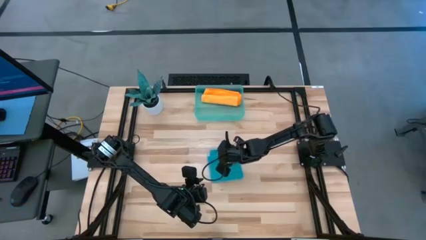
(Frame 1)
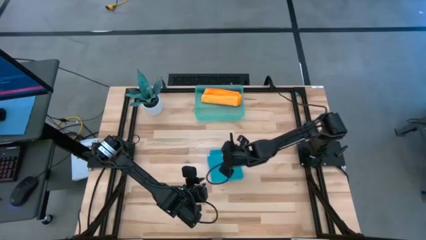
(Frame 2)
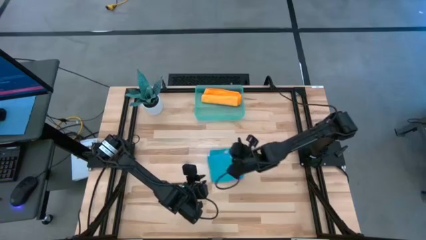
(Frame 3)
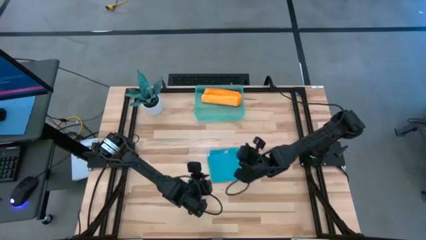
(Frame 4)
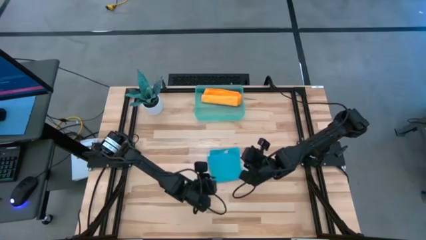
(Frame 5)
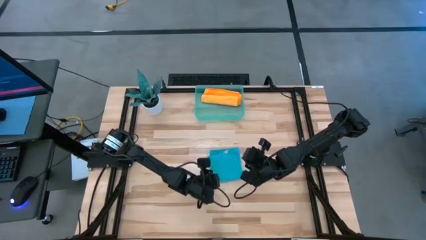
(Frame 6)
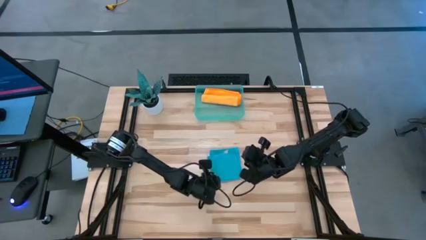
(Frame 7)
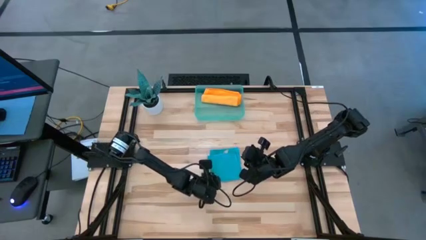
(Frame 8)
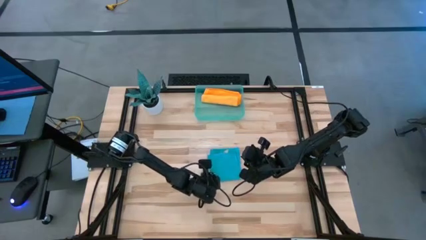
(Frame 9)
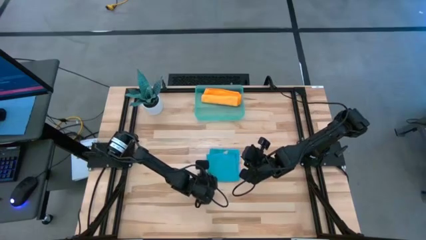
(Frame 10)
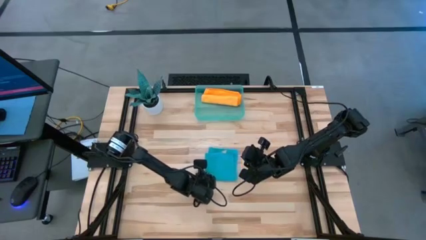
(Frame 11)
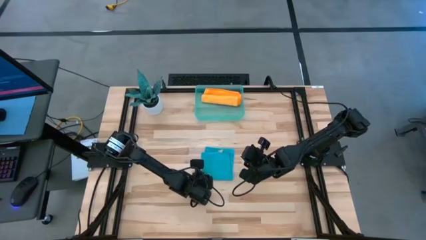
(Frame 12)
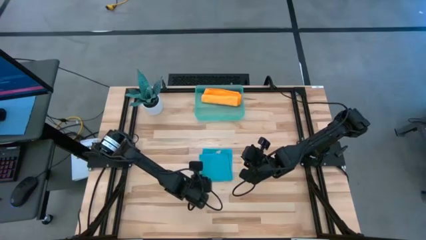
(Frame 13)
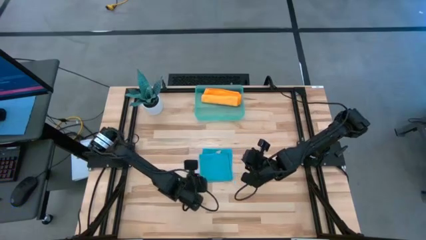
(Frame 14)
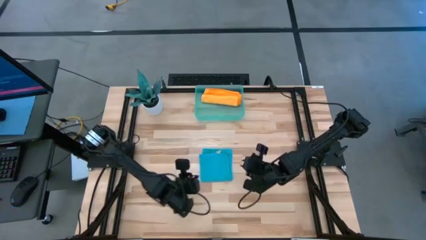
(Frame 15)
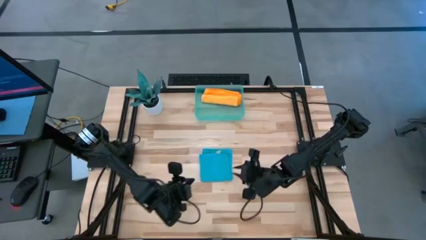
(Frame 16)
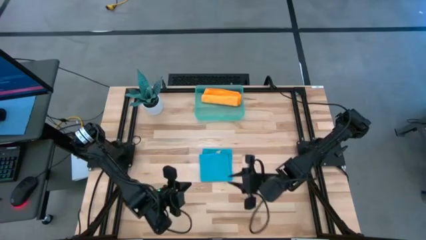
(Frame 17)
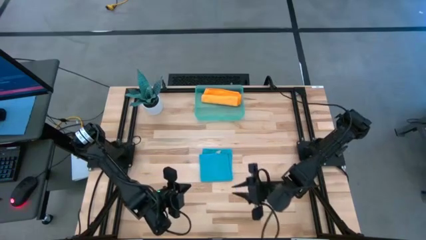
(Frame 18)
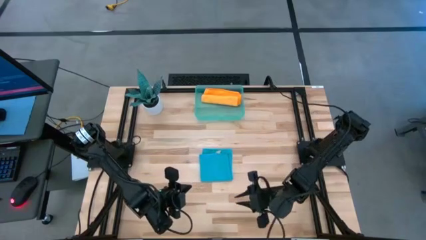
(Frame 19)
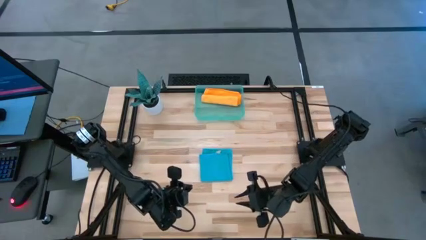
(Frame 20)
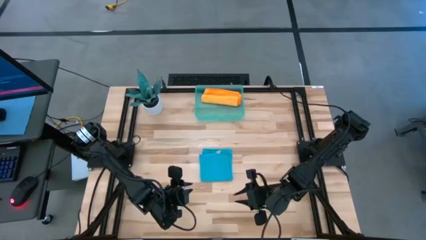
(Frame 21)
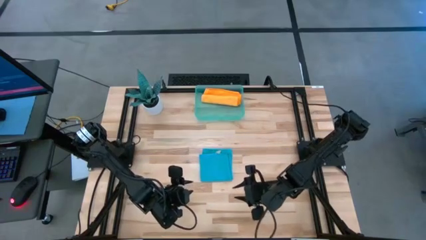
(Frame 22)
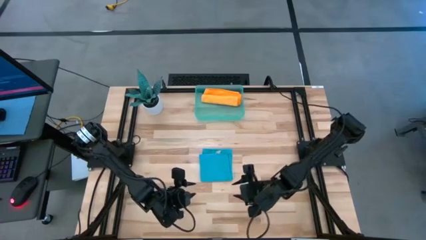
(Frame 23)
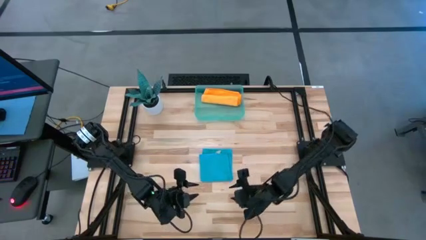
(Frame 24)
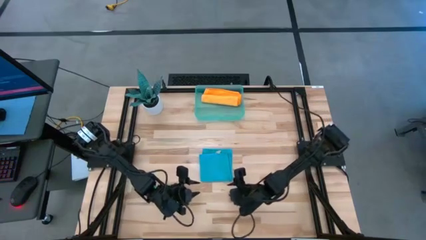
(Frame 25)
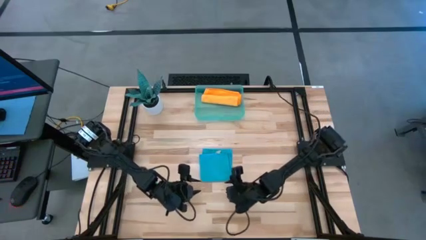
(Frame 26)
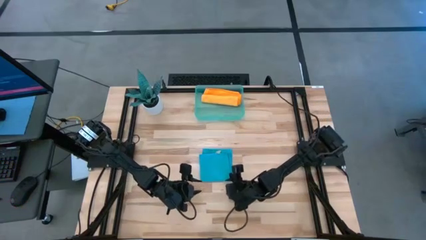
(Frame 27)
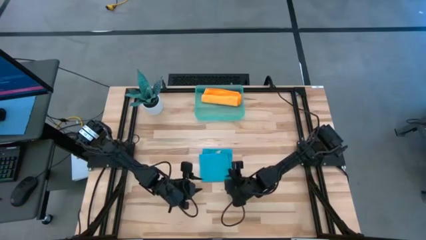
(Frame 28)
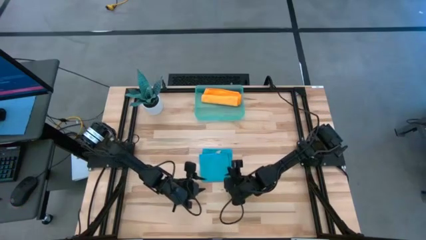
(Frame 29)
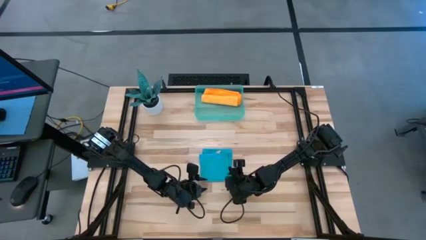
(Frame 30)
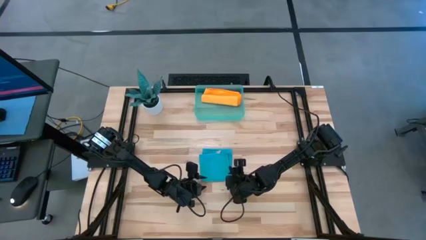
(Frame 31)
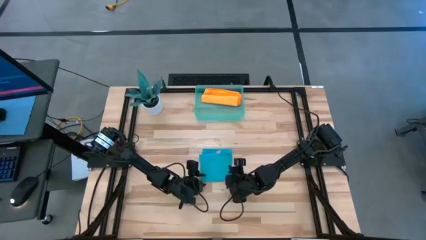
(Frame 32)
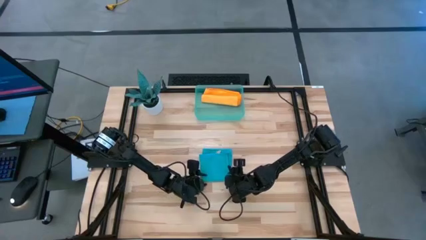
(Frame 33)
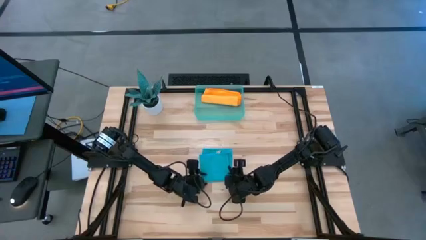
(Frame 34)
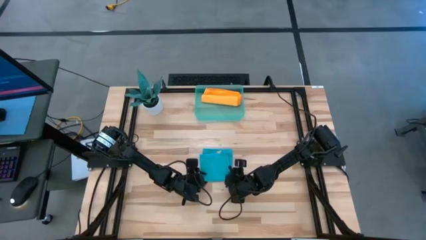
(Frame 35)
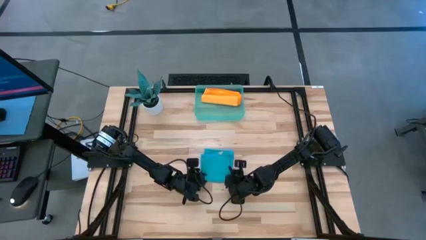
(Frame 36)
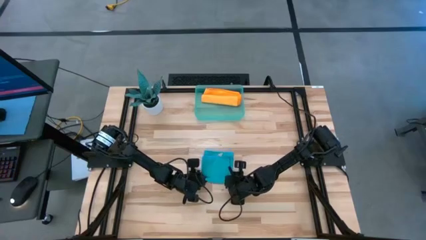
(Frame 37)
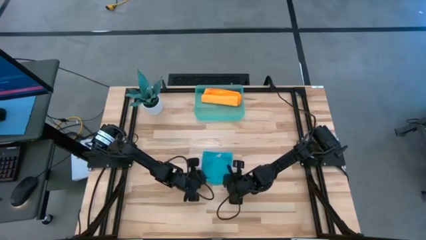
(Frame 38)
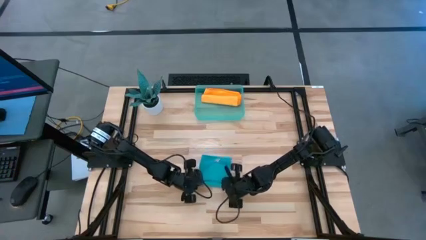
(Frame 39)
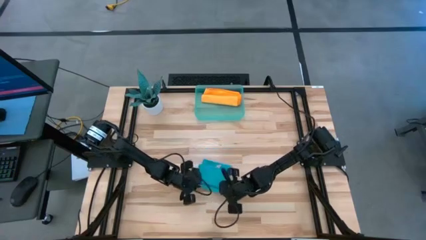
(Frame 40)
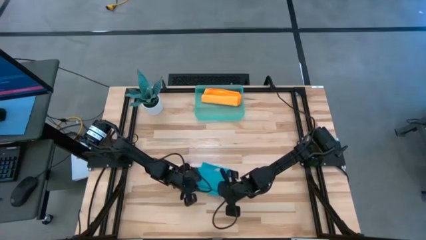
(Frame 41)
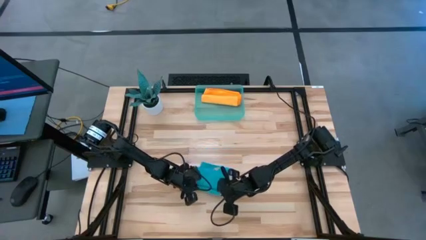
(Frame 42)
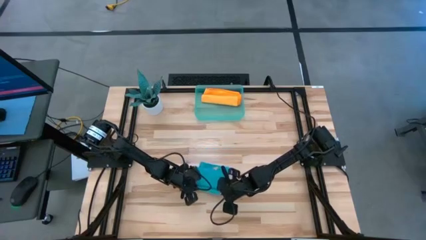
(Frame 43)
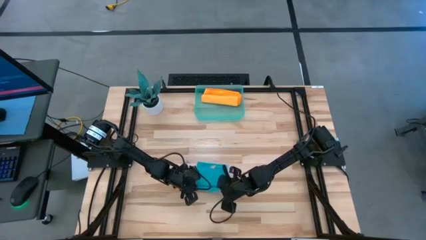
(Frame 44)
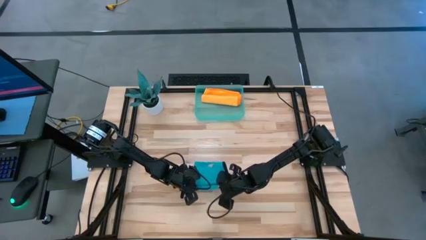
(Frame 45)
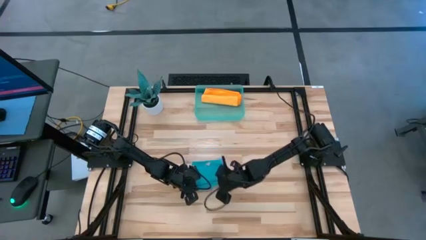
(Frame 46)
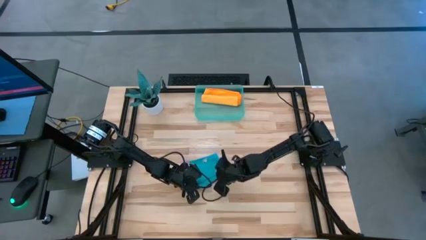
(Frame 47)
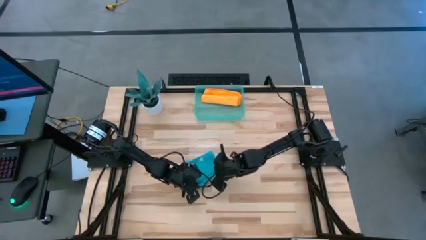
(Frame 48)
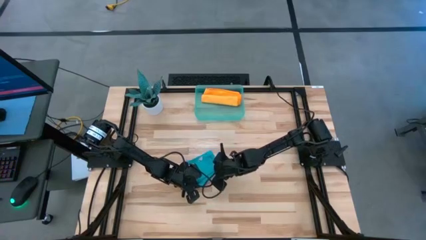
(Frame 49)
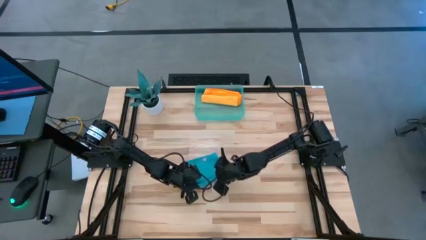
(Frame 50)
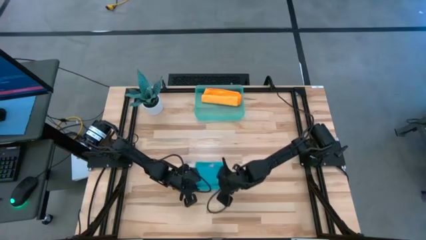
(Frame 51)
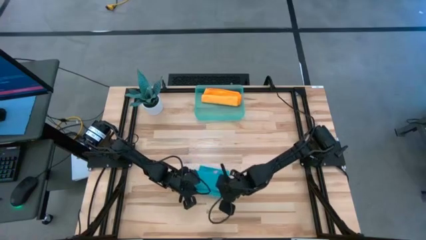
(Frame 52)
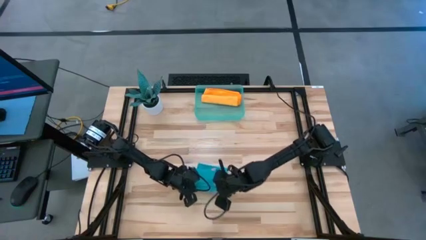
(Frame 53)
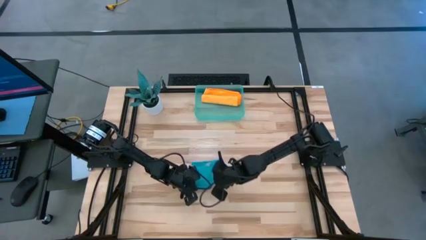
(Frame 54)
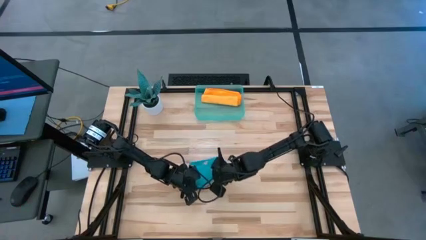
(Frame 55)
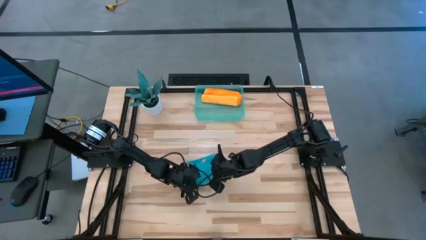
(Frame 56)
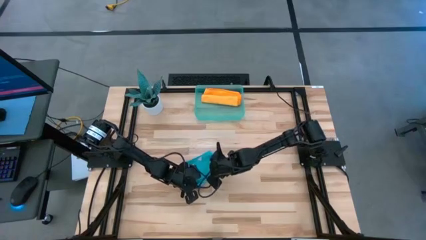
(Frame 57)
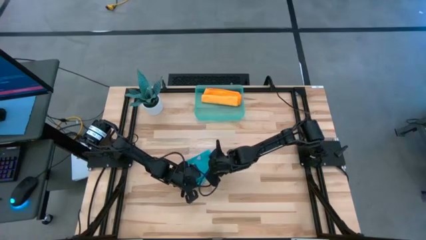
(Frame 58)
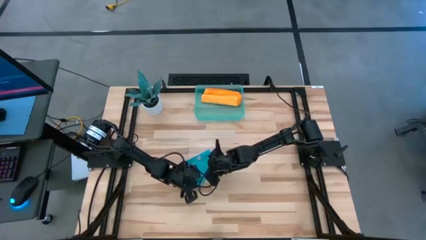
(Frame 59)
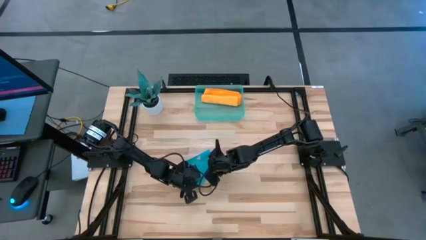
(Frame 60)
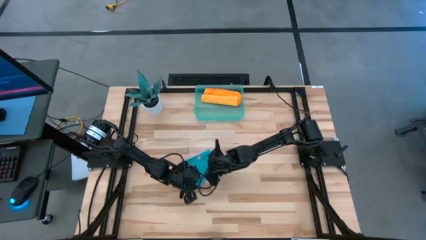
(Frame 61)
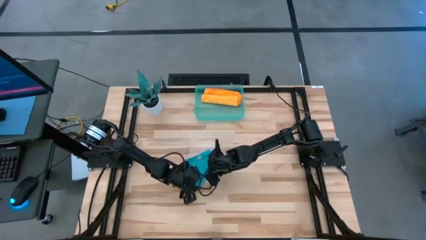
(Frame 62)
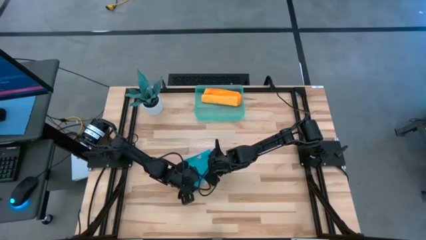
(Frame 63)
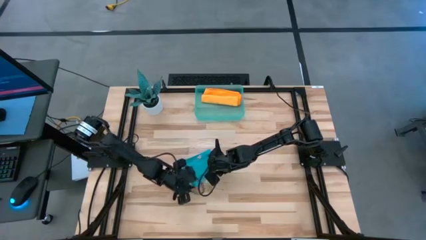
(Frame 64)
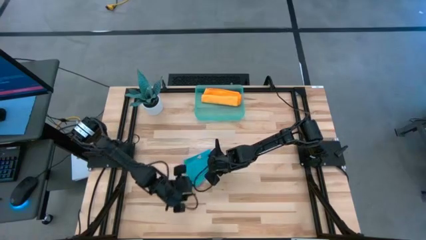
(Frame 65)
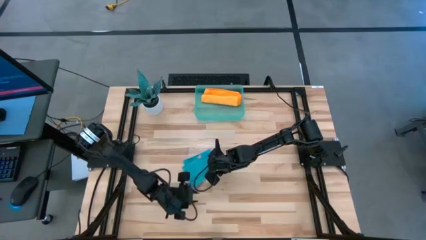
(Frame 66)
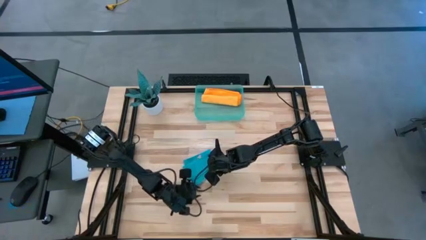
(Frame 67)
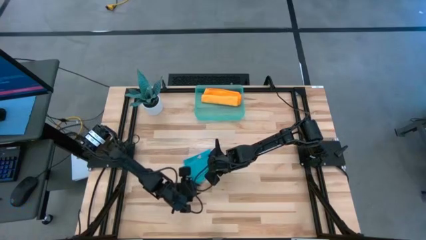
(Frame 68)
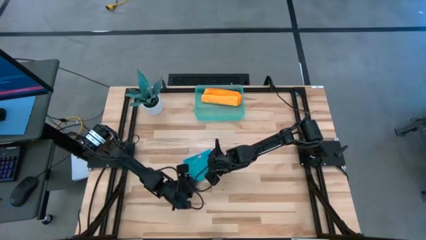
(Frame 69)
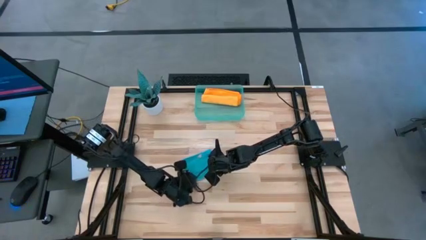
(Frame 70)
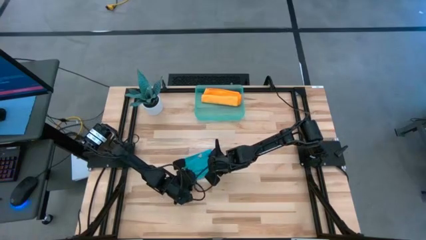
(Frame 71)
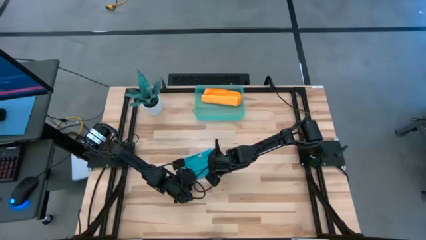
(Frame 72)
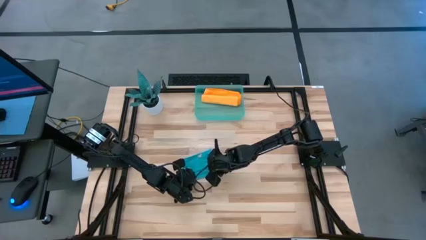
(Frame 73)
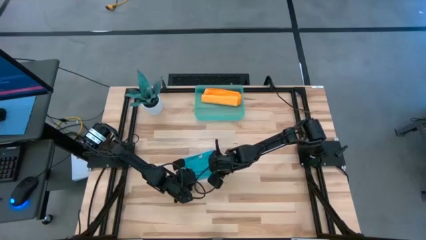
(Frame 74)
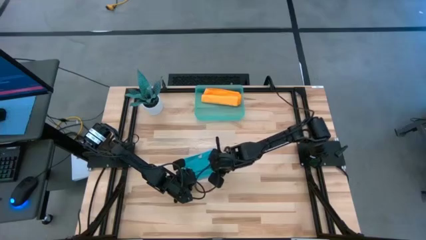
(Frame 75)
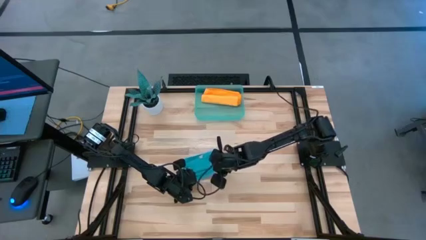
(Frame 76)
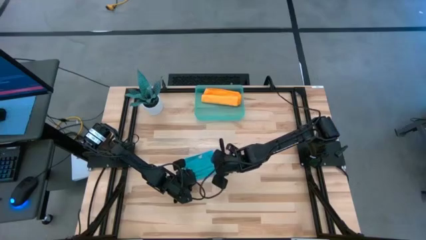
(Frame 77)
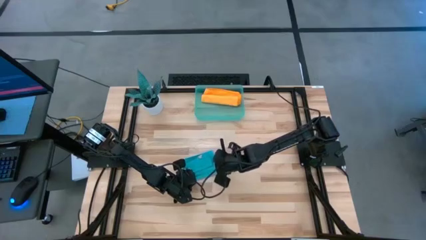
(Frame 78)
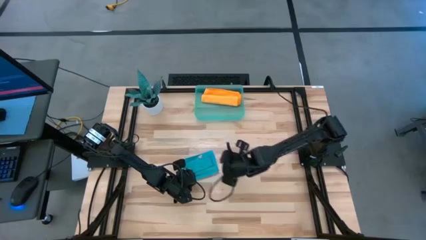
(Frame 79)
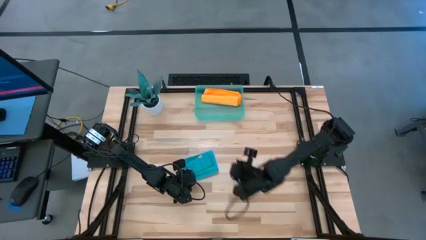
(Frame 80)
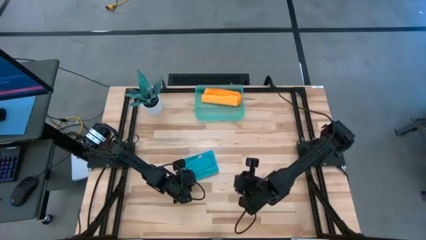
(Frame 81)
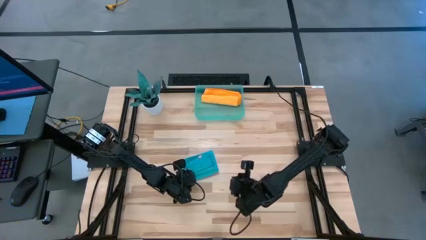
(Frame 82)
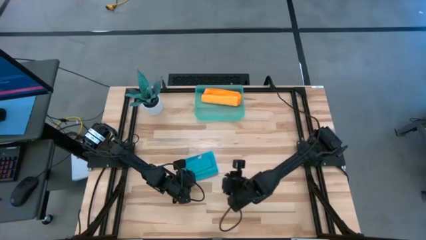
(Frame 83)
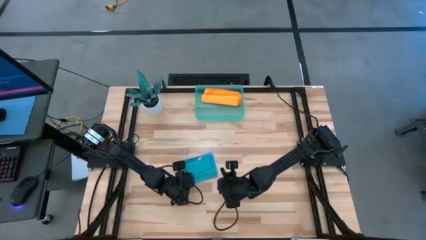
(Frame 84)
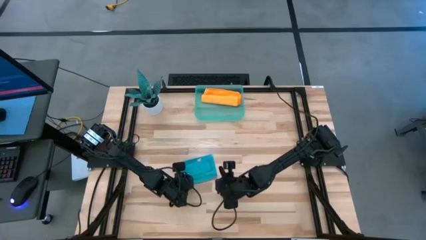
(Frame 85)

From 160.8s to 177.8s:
Task: Roll microfiber towels into tight, uniform cylinder then place into a basket
Roll the blue microfiber cloth
